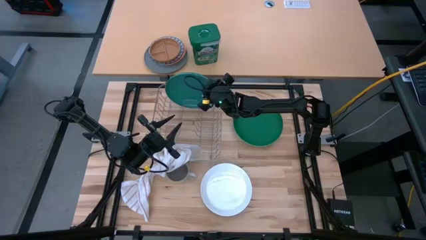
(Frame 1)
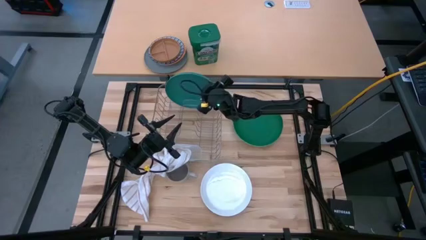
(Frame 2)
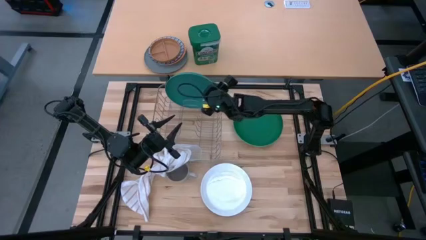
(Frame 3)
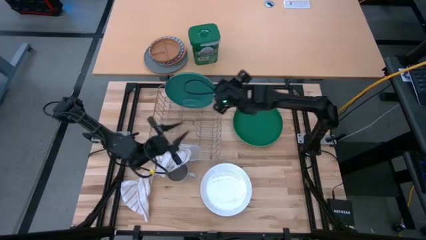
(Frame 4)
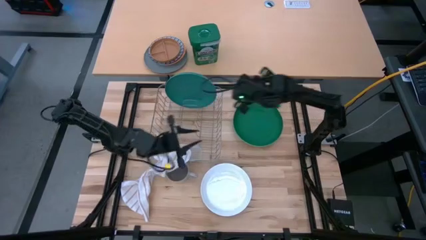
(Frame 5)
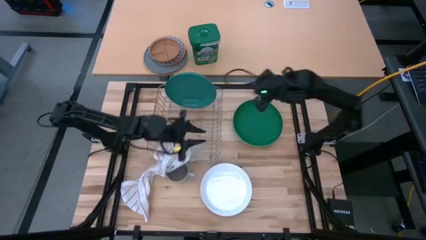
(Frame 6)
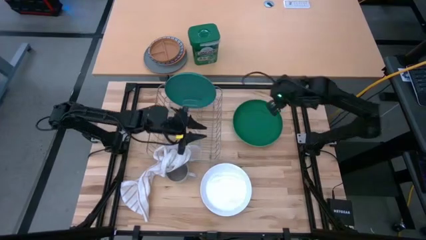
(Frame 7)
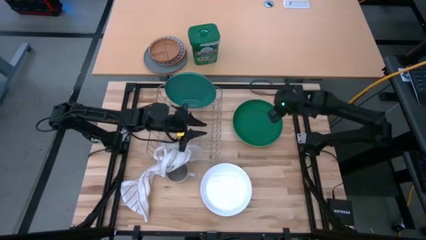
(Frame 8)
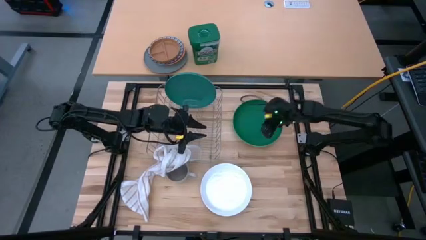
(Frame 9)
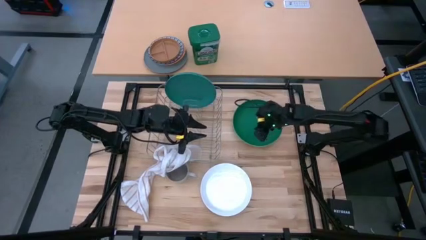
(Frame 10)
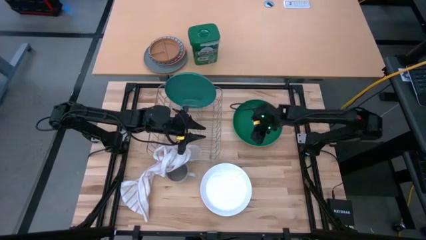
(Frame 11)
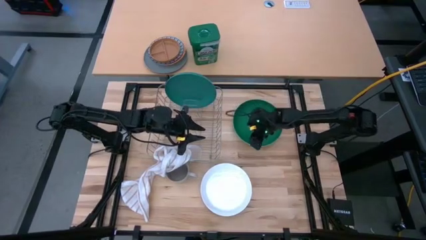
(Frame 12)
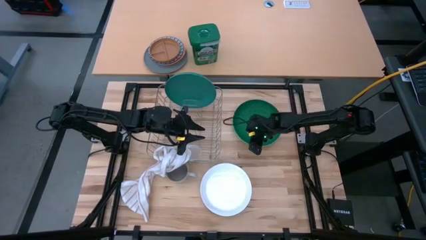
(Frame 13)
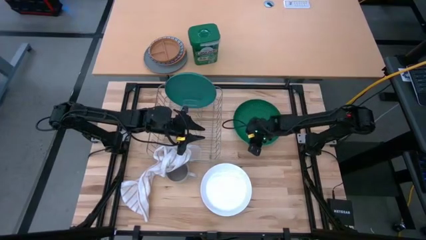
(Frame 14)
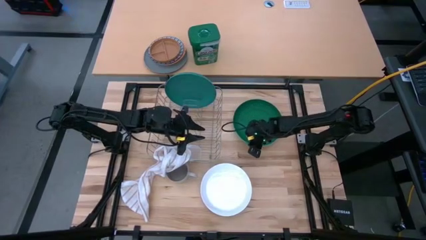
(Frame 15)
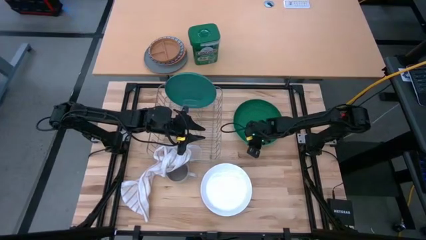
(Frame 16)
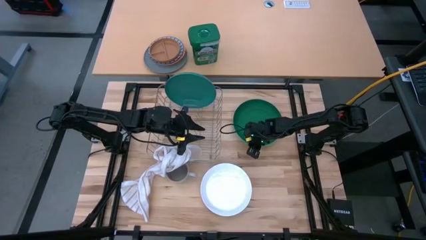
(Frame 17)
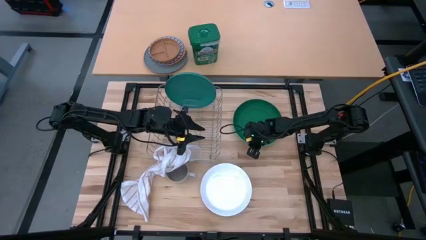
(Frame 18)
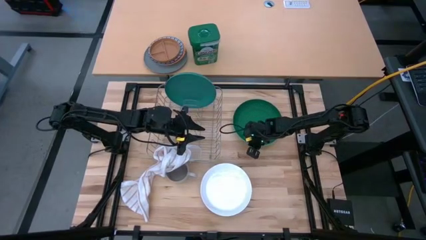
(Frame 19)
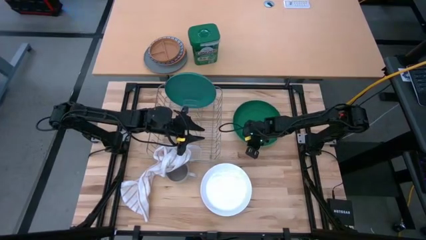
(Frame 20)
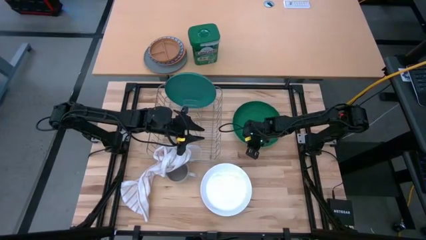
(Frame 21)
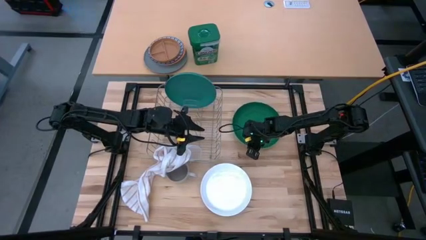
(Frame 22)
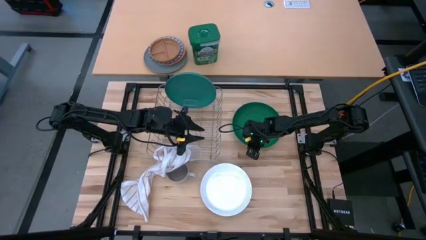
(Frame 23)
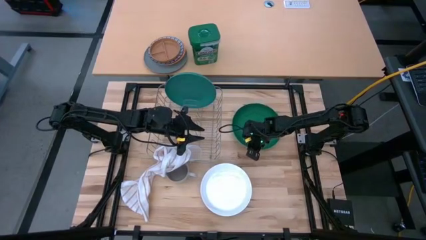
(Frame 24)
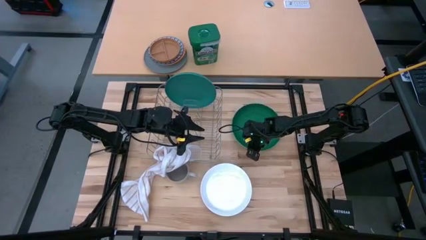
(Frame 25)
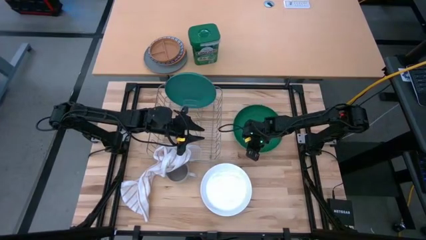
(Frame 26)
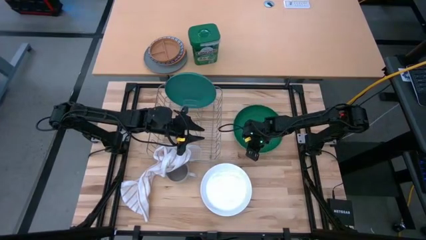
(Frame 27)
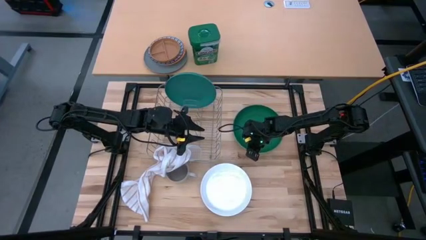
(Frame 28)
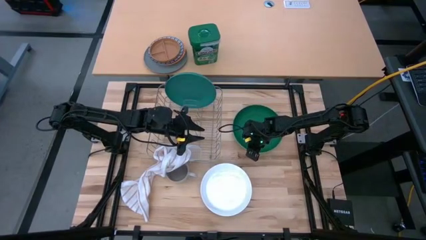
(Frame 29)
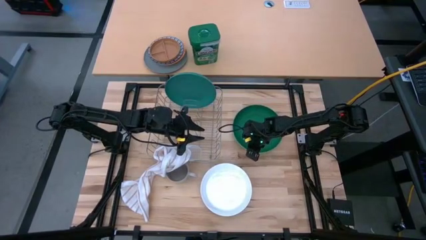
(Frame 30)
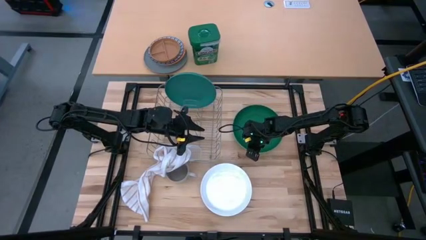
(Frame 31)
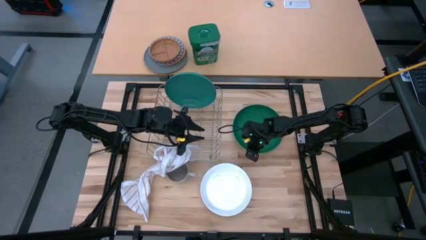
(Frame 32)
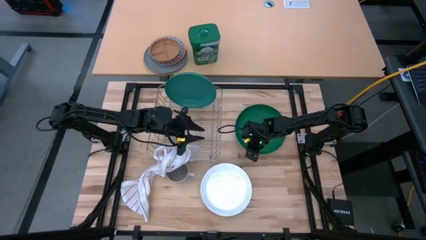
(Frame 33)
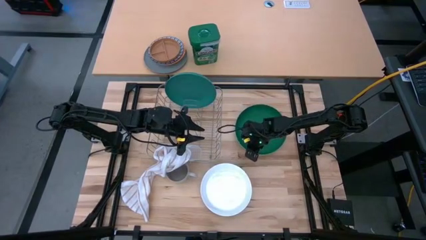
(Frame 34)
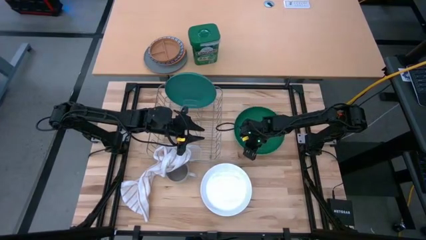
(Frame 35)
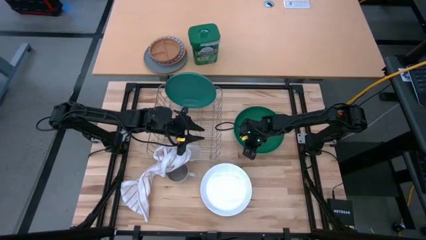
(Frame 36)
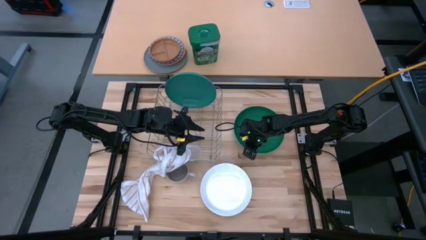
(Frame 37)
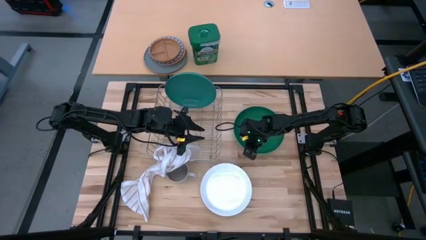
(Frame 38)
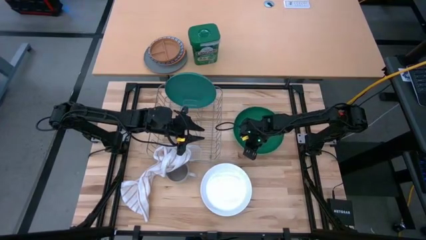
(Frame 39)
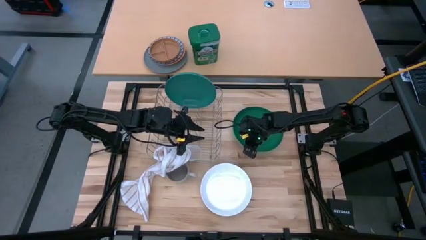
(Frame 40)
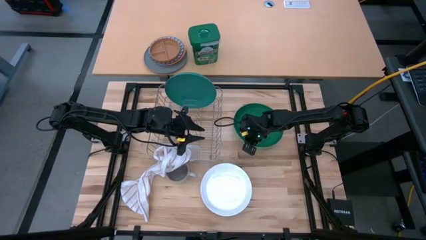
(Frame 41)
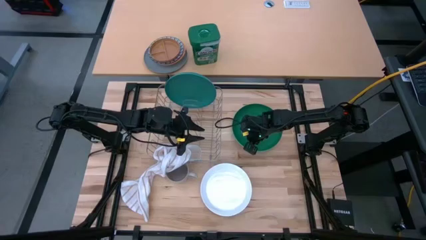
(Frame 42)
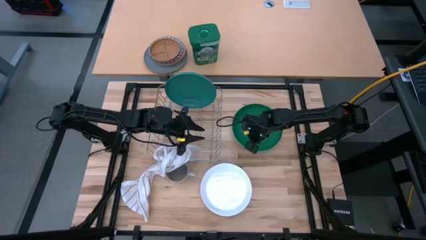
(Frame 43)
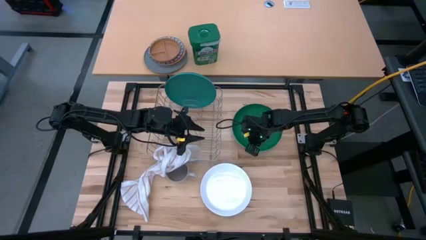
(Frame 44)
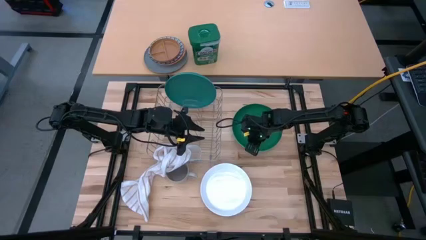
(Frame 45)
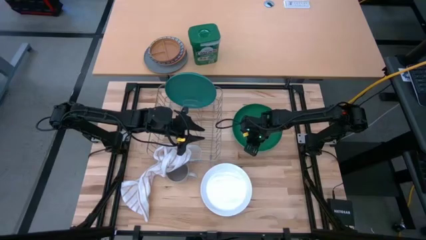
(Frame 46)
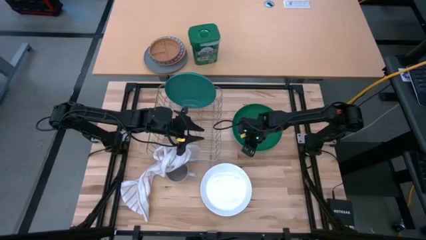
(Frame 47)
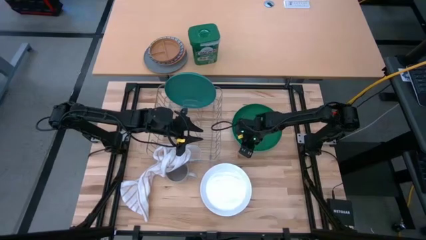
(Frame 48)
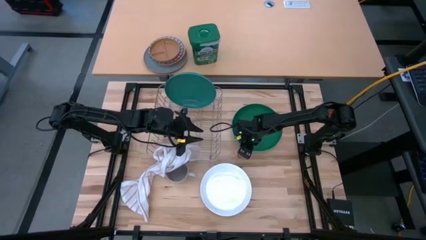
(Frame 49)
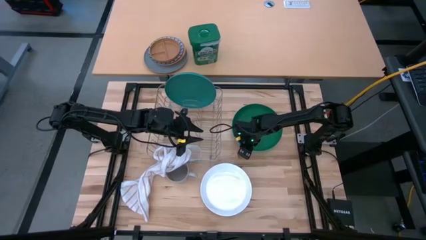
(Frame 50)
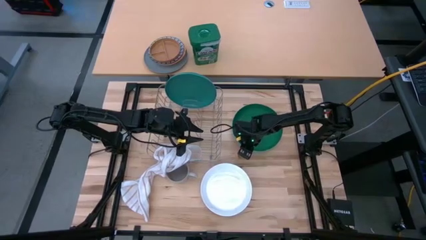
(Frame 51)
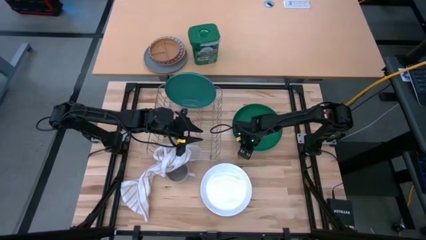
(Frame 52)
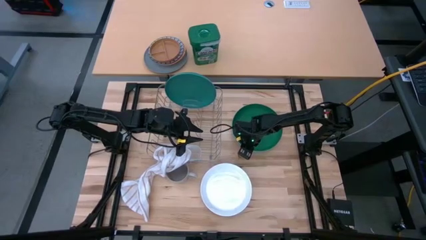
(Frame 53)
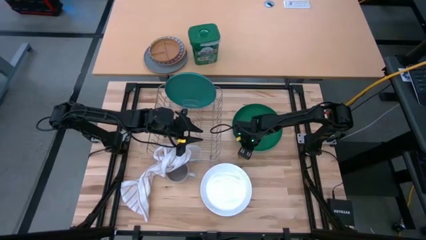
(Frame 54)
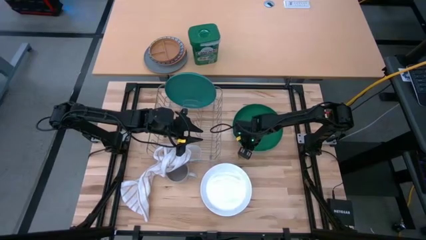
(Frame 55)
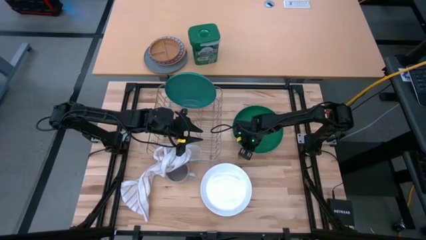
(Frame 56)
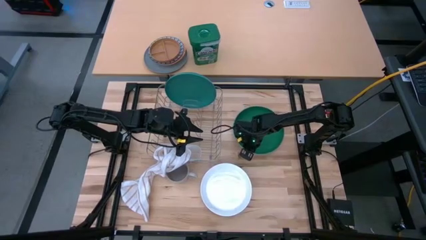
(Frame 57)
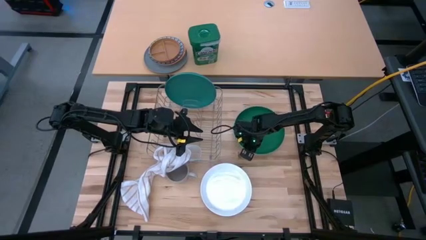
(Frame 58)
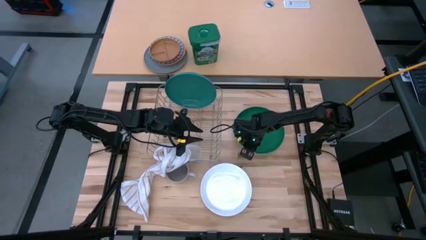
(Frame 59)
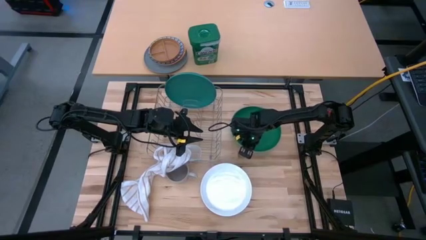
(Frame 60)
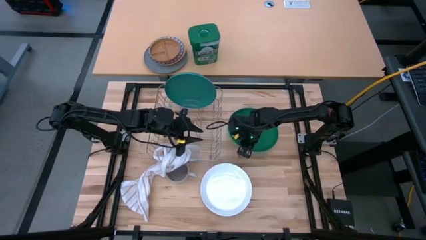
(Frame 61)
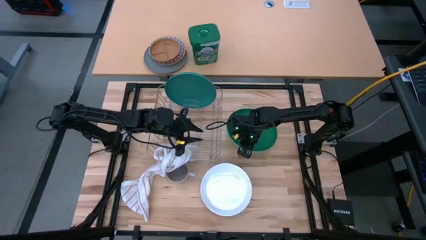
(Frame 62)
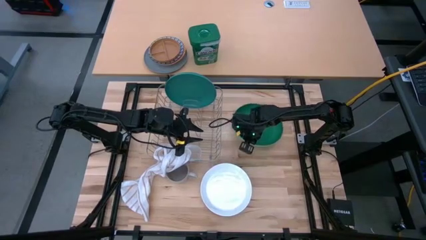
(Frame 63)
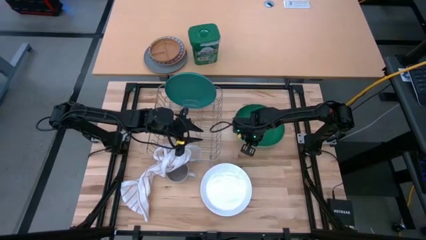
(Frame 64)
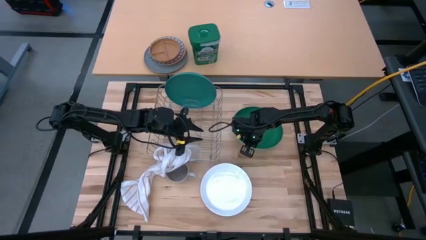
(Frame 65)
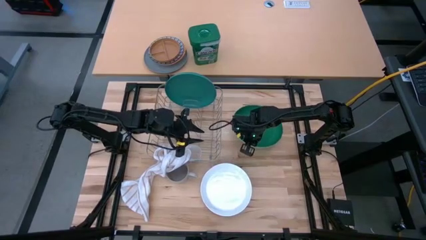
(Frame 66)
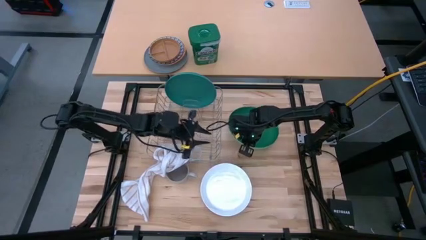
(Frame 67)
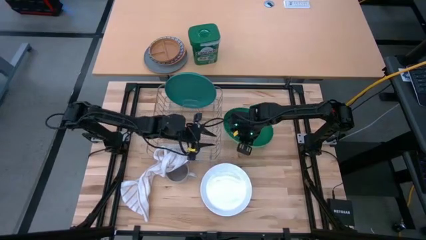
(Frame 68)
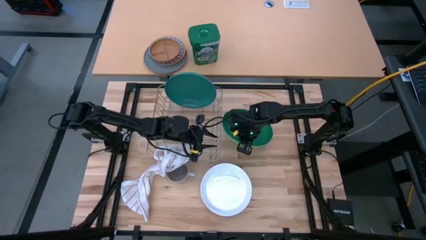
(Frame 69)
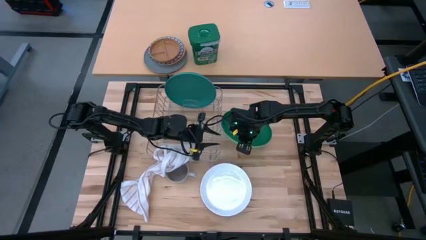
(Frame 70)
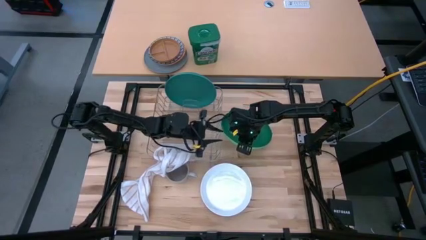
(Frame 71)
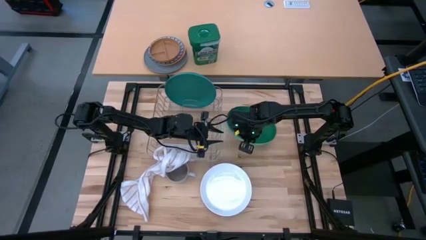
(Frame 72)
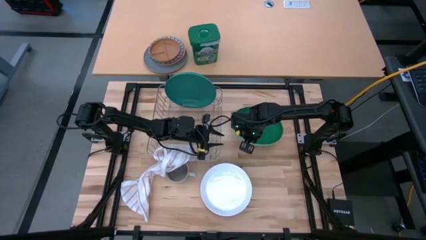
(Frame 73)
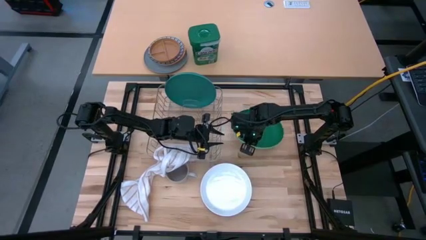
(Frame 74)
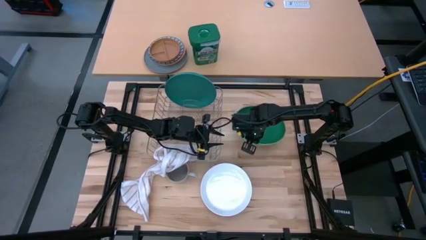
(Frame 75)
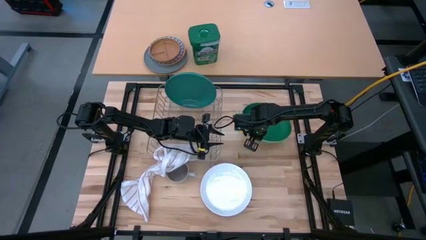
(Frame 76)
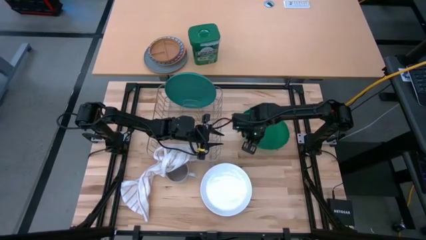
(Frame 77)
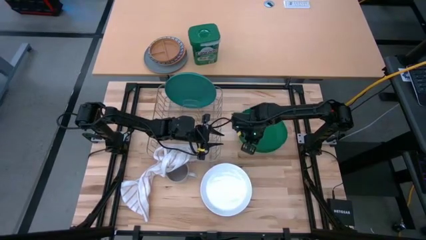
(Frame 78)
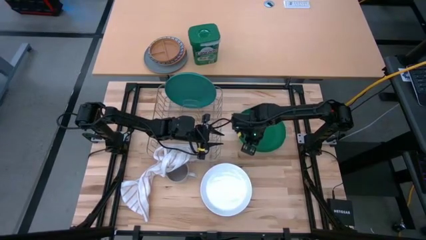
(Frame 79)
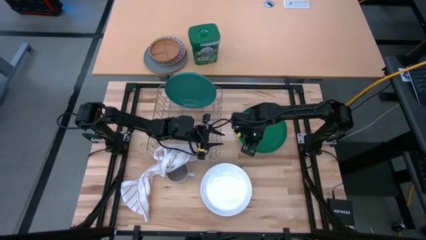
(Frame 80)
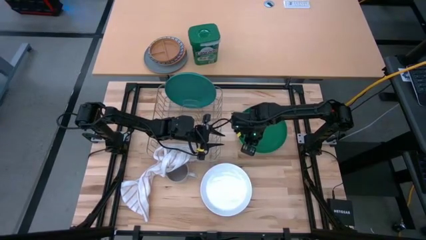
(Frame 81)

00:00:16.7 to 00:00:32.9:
Task: Sort dishes
Put the green plate into the gray dish rack
